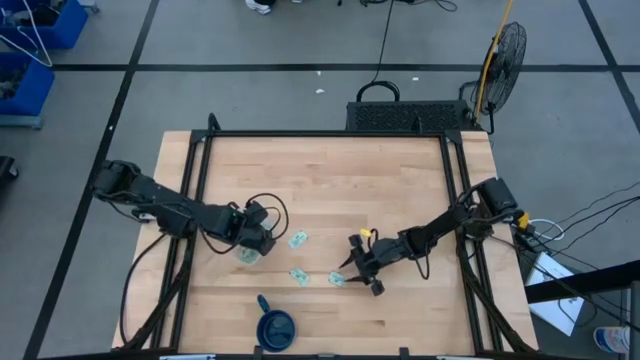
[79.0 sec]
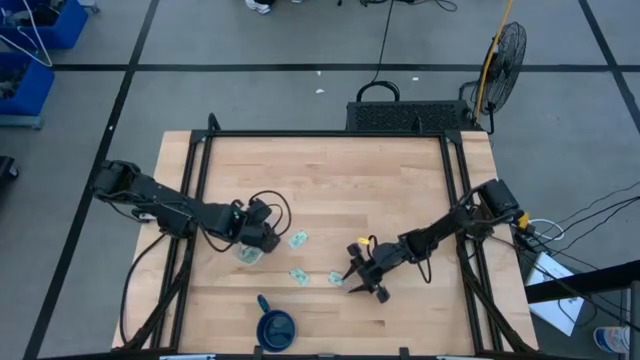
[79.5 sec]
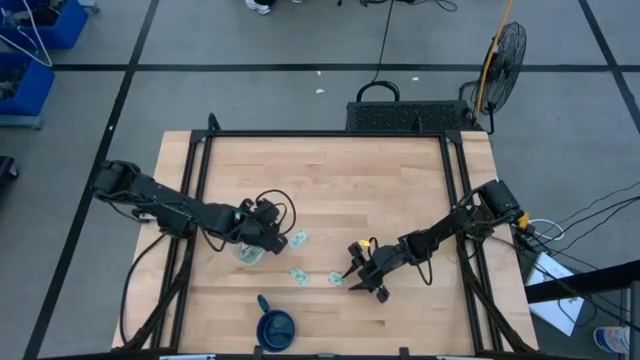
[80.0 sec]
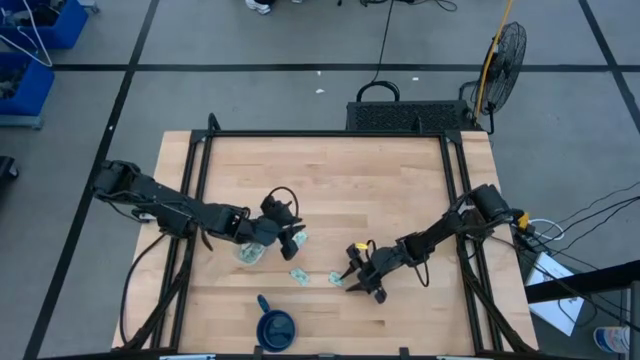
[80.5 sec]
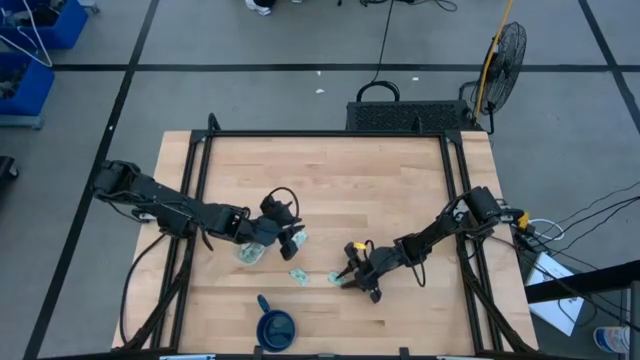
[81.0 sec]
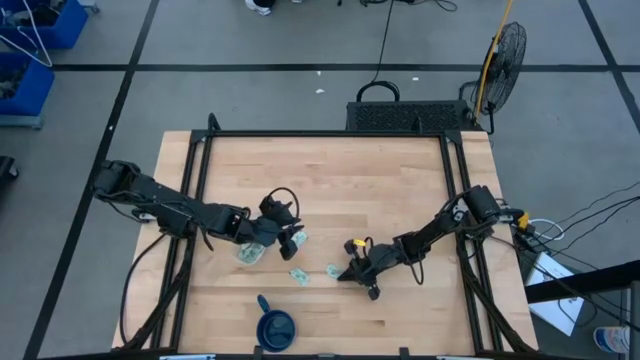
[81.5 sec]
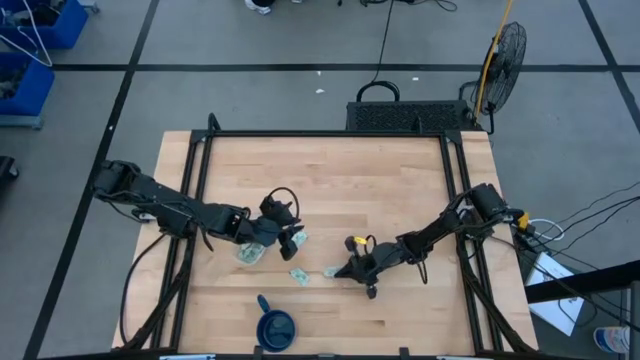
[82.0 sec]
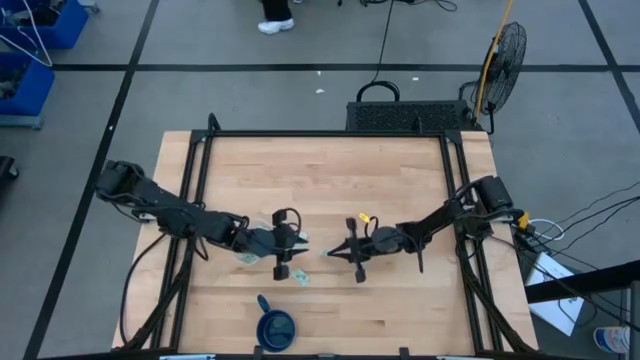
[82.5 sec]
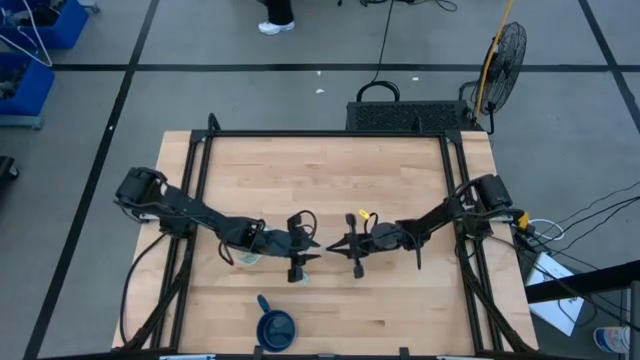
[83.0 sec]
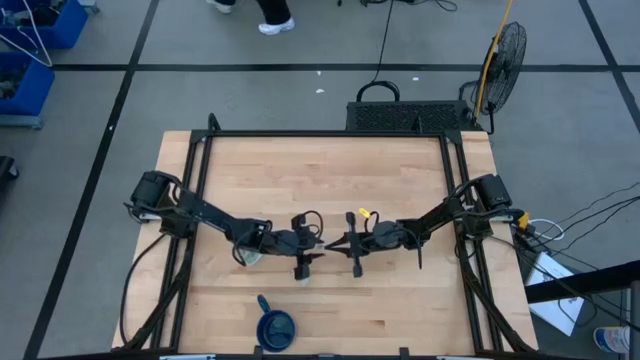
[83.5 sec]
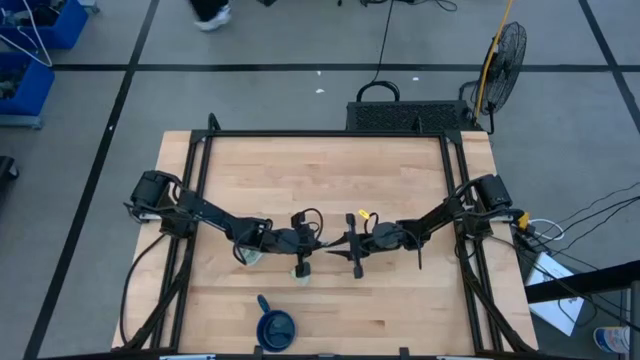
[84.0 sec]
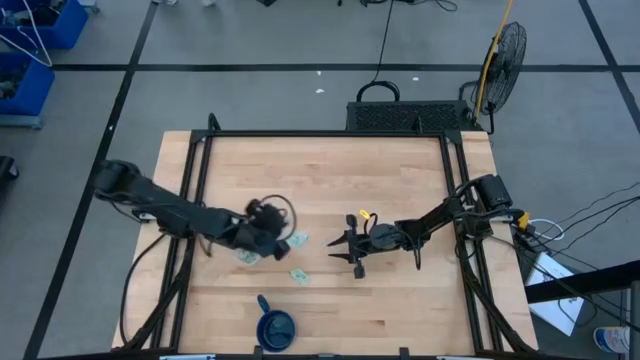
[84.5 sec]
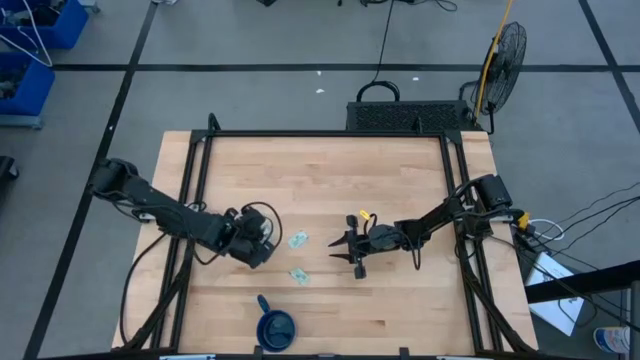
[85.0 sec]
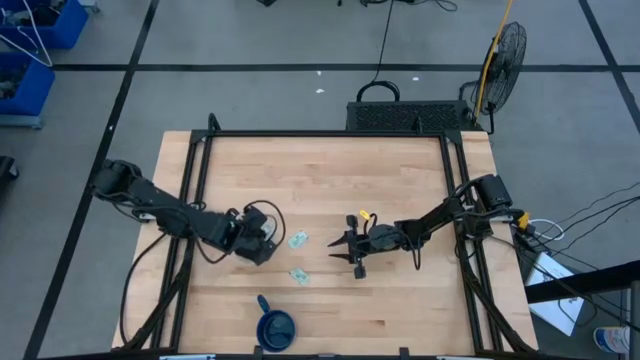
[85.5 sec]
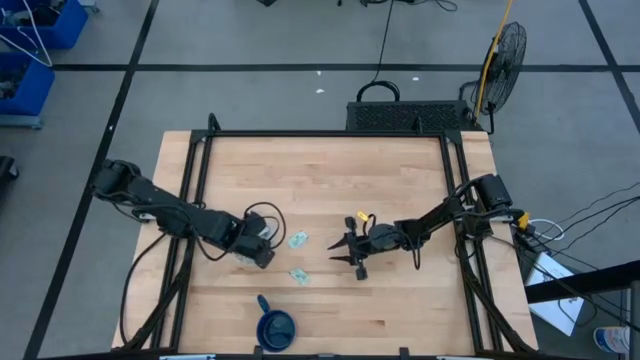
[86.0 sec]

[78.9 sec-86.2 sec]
Task: Pick and place Stevia / Truvia into bins
Put the stevia packet into the transparent container

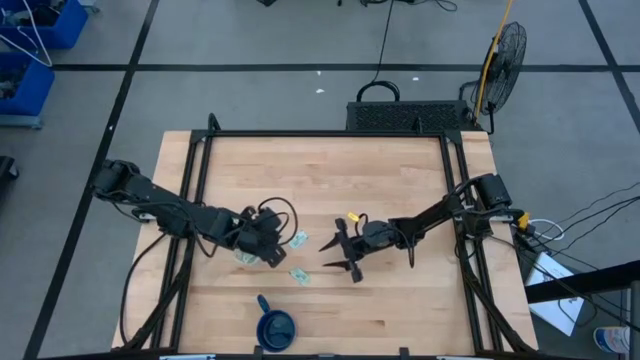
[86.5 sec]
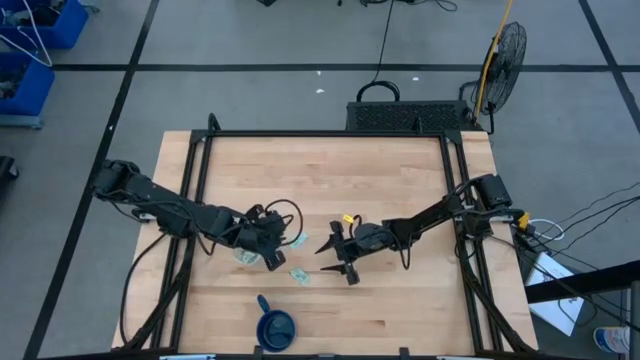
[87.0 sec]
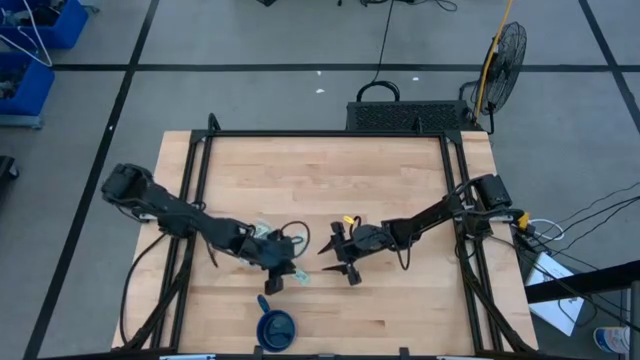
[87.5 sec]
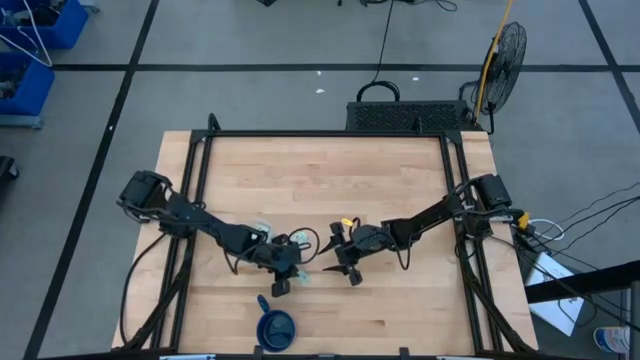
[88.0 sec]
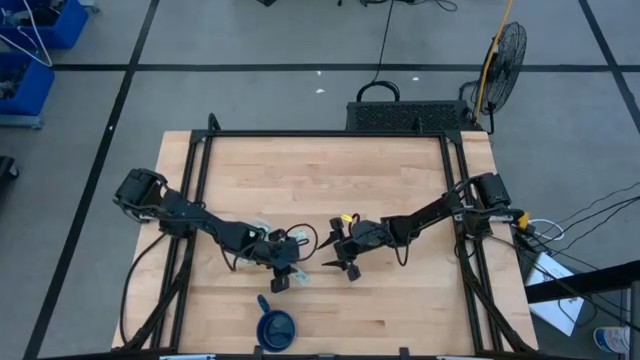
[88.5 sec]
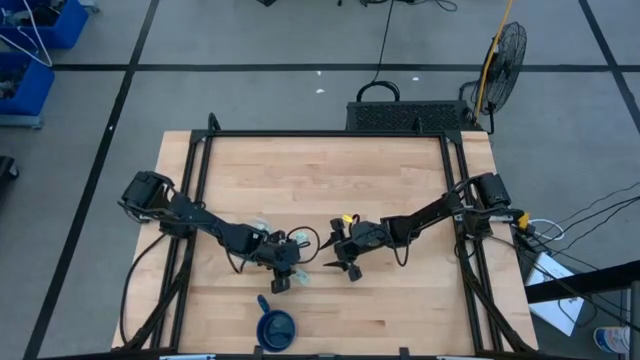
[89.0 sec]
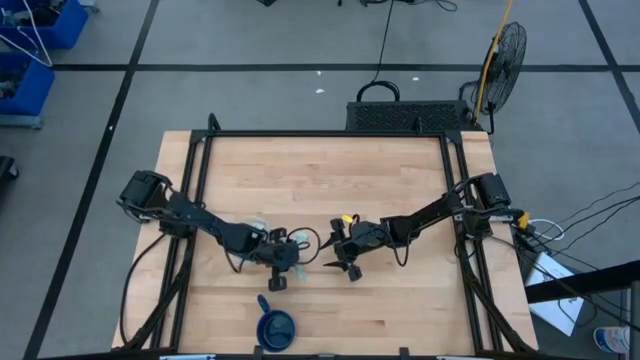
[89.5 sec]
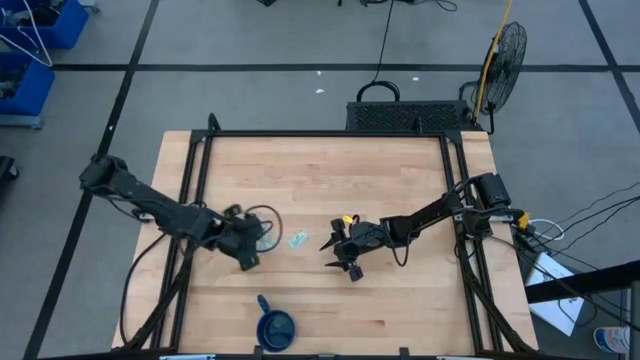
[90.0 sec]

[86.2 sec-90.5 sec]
Put the stevia packet into the transparent container

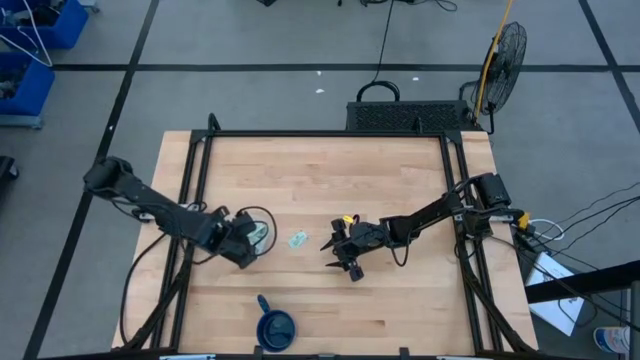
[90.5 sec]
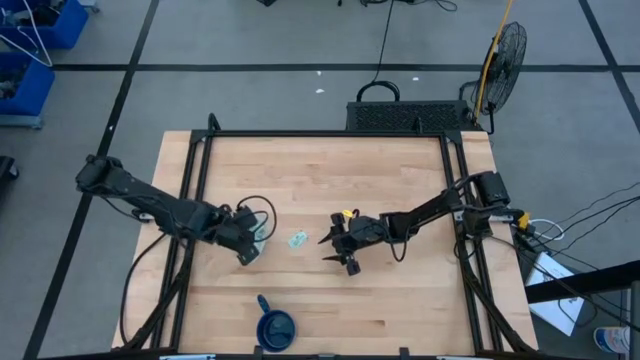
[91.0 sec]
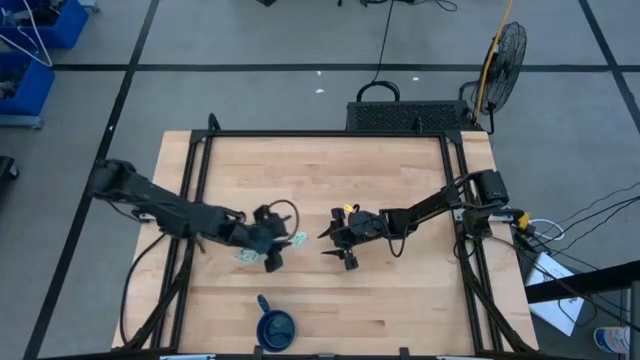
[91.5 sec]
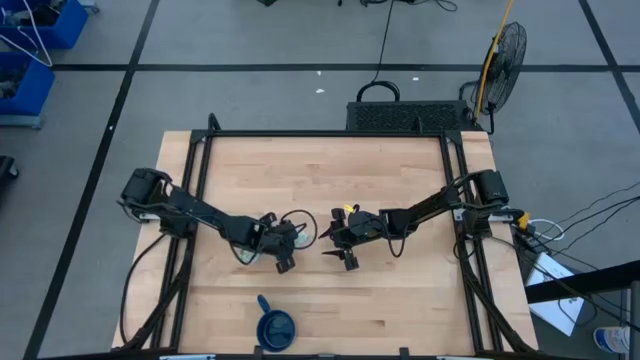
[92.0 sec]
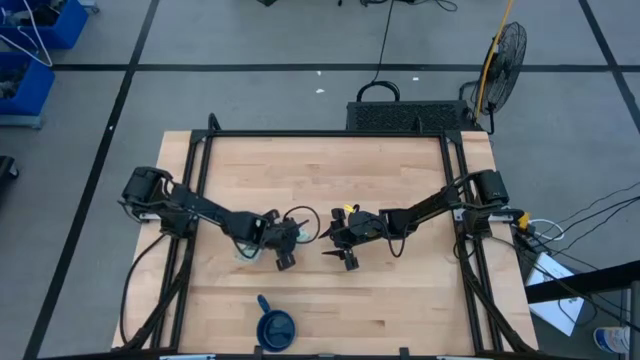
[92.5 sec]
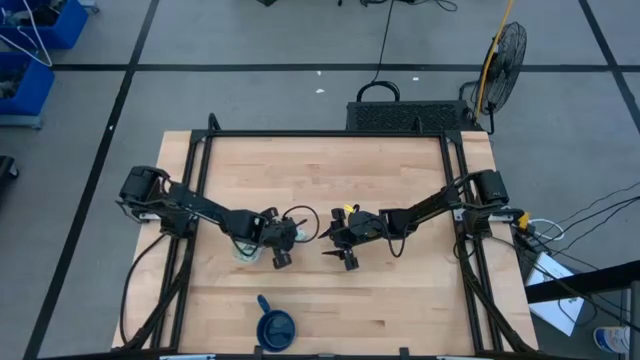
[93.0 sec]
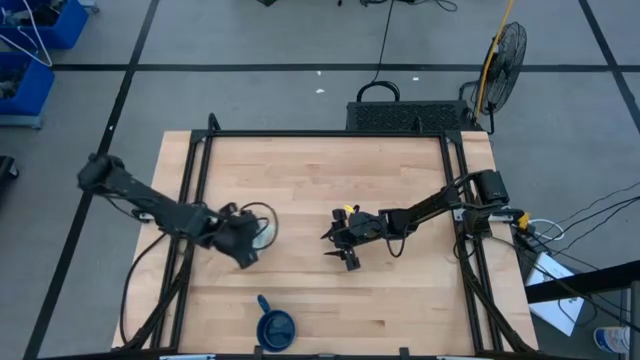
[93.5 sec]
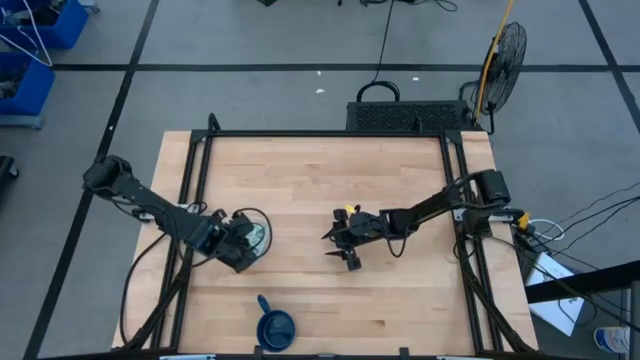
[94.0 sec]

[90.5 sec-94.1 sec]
Put the stevia packet into the transparent container

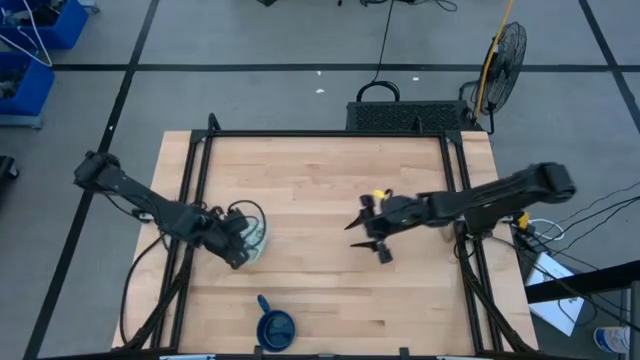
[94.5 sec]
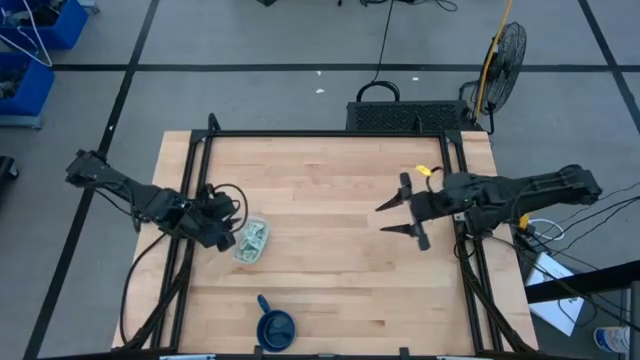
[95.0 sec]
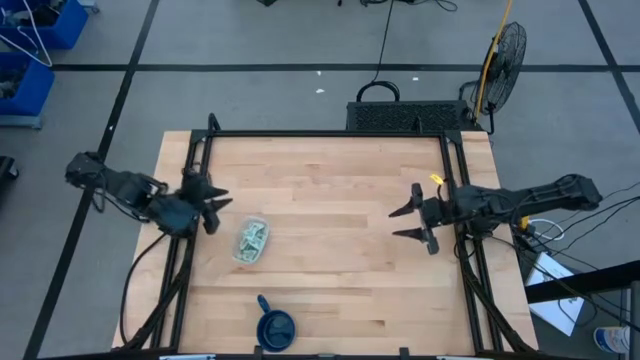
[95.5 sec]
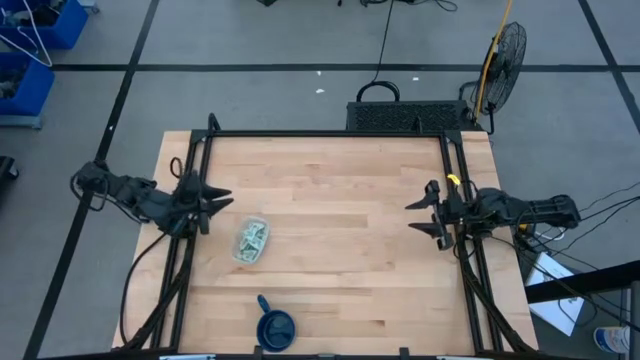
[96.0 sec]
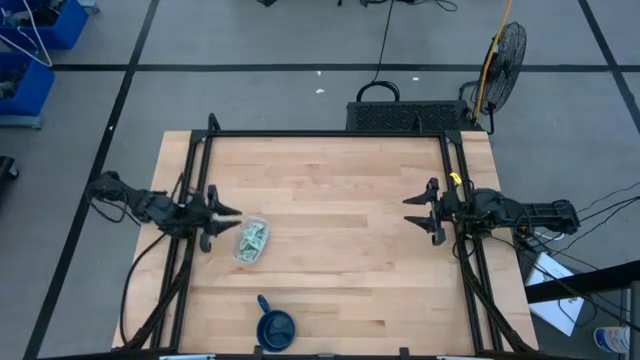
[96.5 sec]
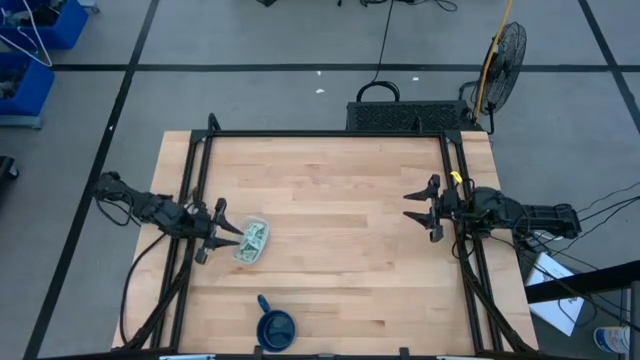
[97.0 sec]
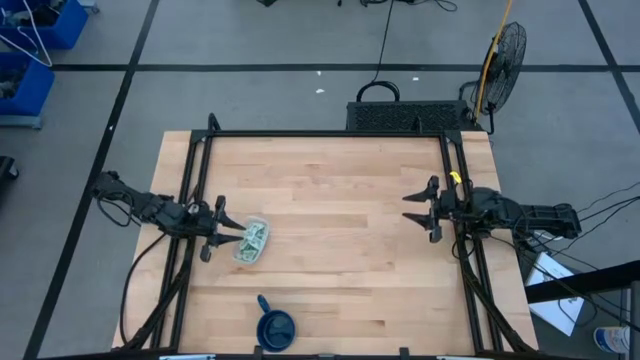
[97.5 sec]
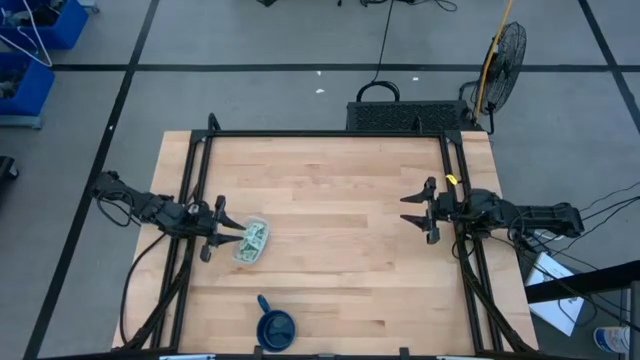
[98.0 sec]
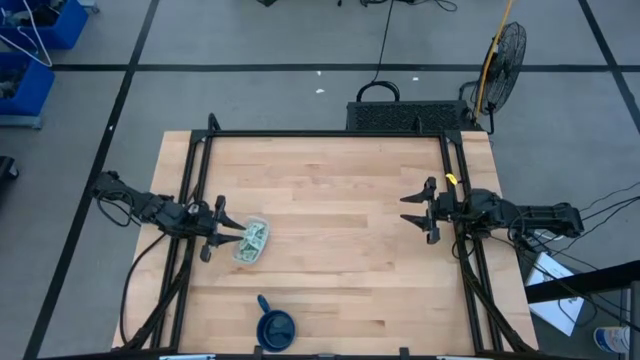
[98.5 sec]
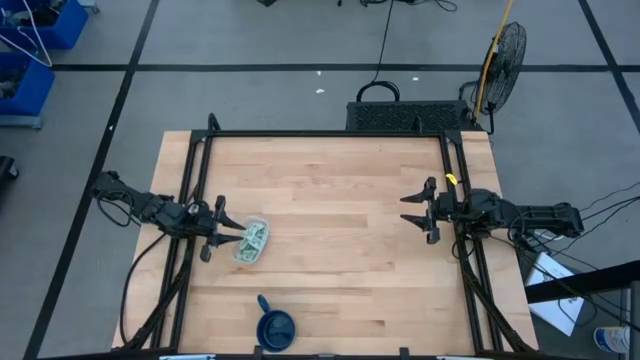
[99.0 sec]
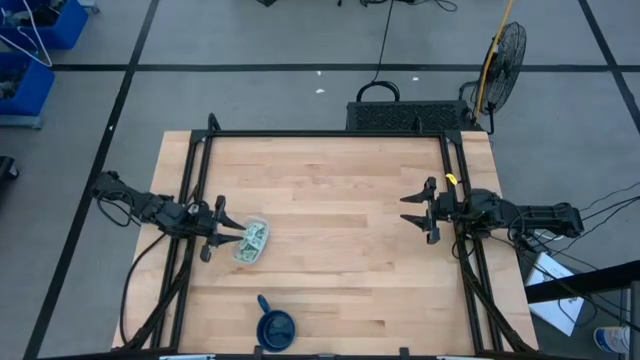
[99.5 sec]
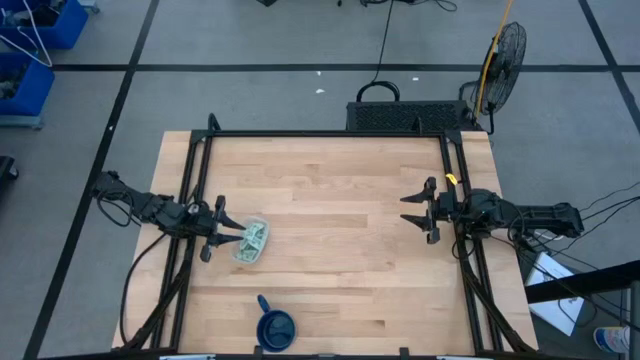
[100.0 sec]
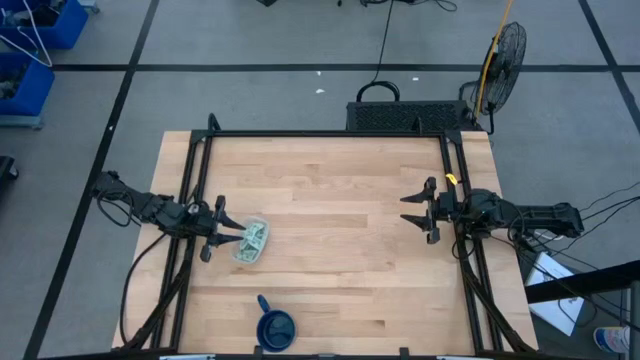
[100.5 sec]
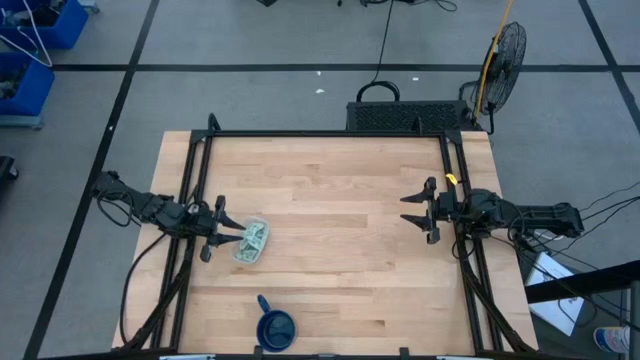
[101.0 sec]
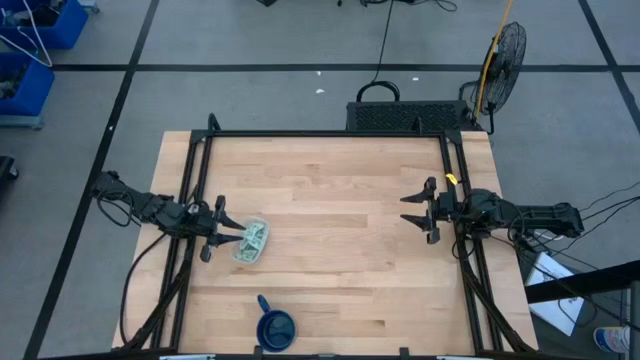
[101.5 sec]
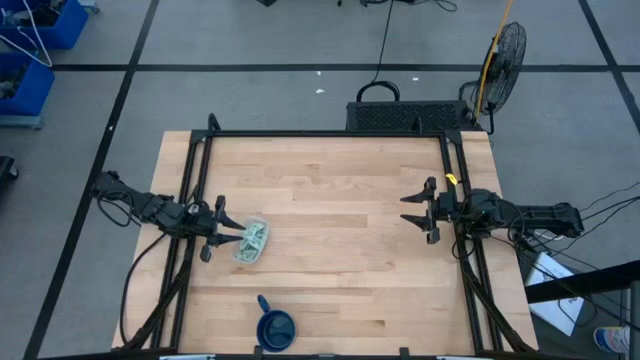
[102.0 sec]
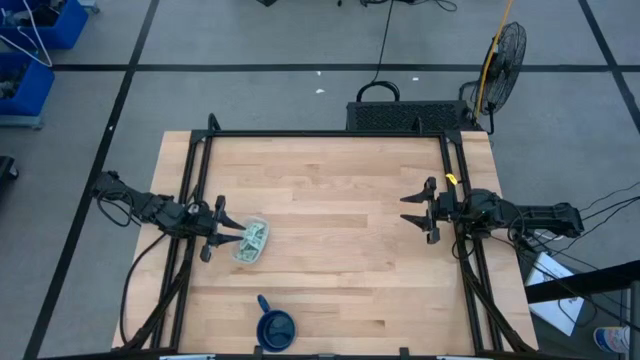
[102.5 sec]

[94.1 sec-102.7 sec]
Return to Home Position
